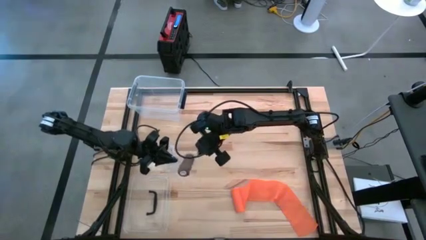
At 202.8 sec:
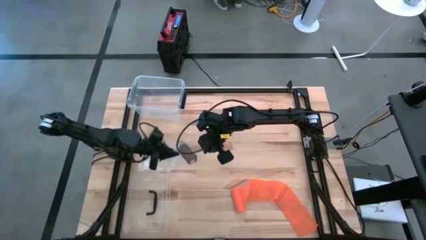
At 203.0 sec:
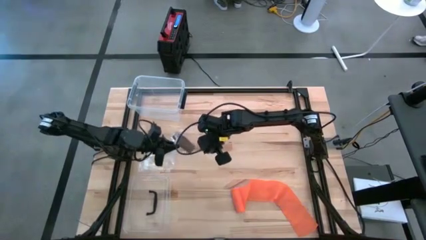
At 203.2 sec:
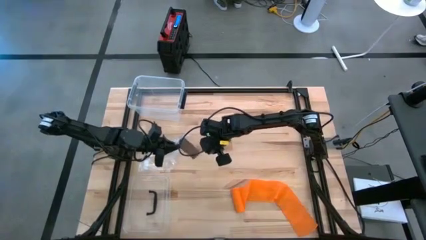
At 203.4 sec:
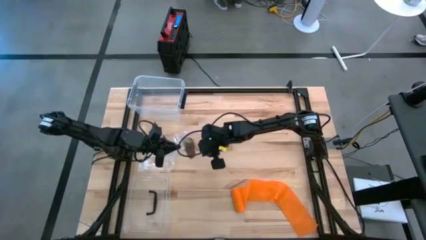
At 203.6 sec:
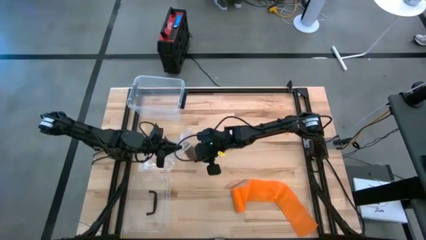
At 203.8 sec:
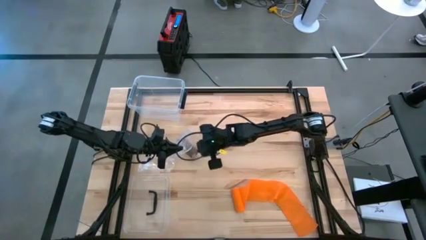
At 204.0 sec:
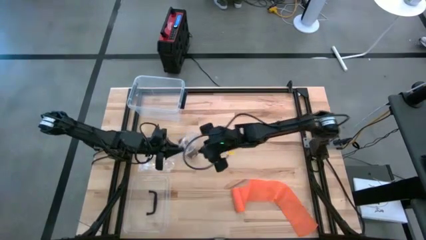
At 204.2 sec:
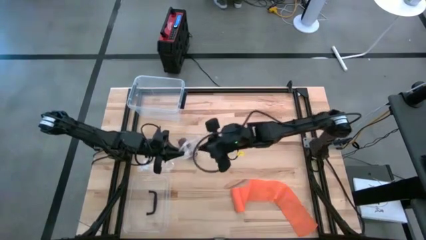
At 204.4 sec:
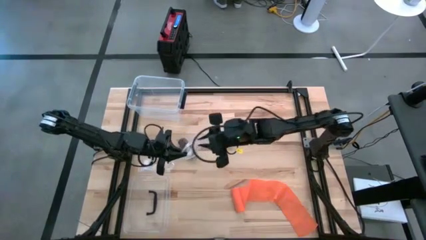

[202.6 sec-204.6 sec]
Task: Roll bandage
Put the brown bandage into the zip bag

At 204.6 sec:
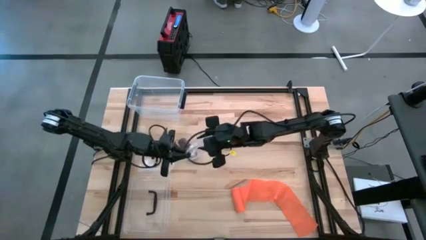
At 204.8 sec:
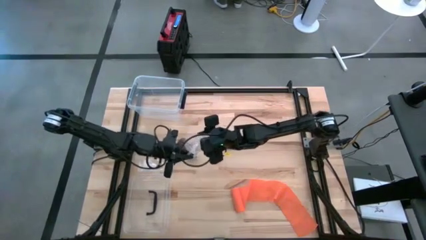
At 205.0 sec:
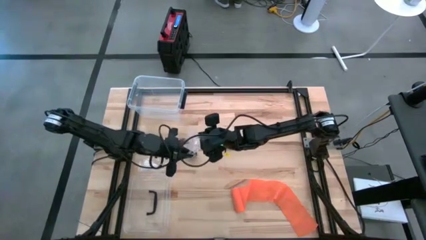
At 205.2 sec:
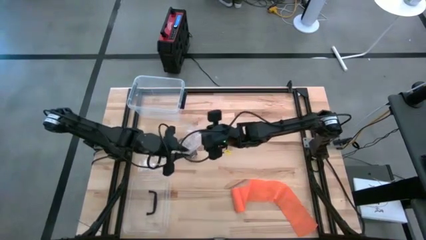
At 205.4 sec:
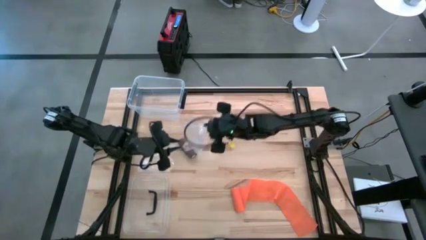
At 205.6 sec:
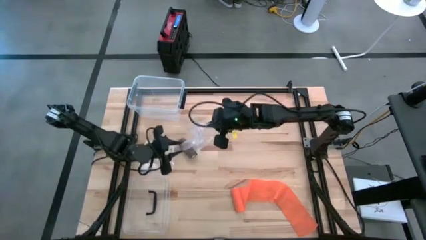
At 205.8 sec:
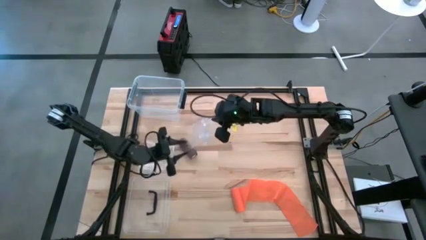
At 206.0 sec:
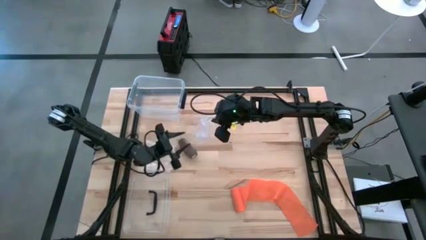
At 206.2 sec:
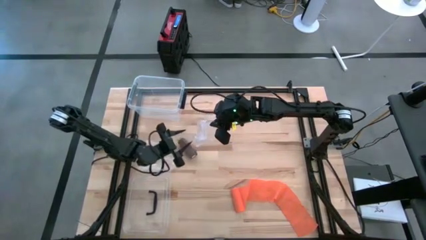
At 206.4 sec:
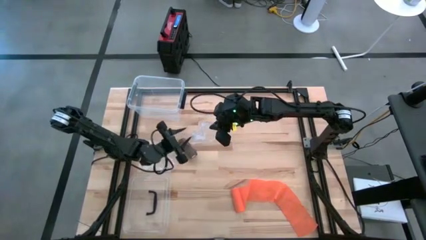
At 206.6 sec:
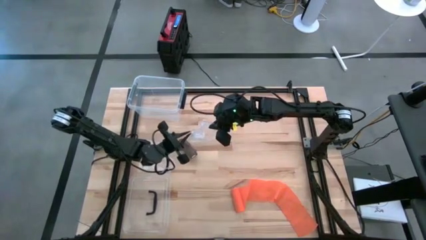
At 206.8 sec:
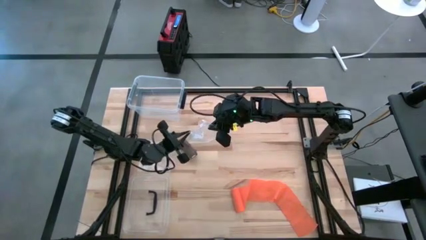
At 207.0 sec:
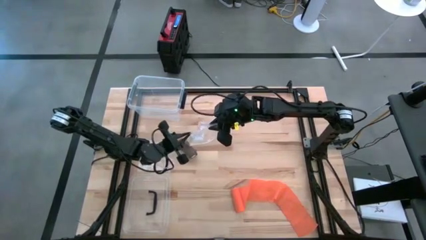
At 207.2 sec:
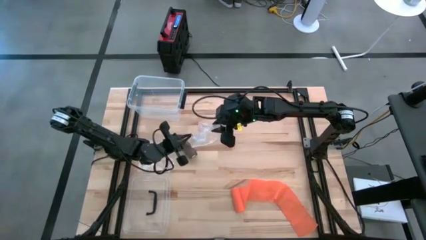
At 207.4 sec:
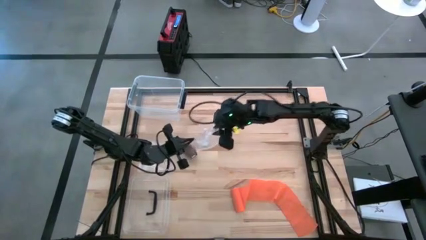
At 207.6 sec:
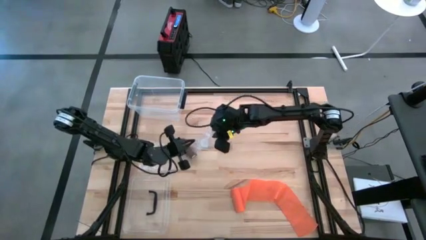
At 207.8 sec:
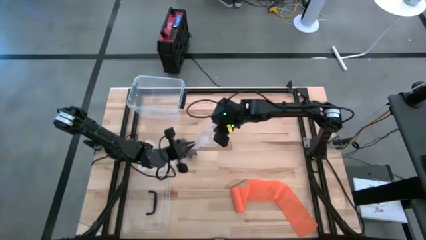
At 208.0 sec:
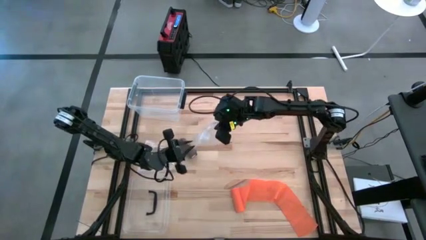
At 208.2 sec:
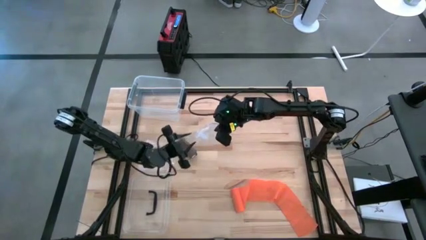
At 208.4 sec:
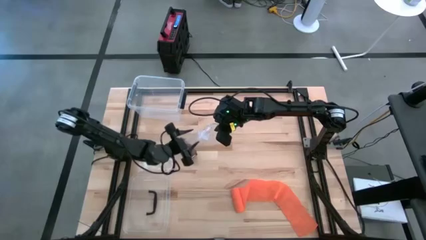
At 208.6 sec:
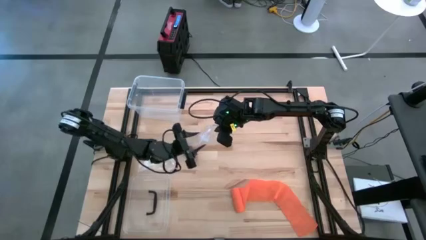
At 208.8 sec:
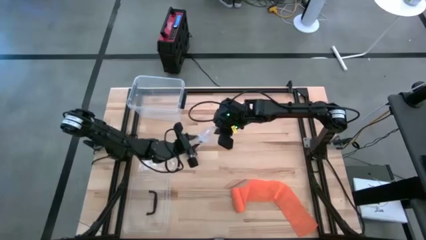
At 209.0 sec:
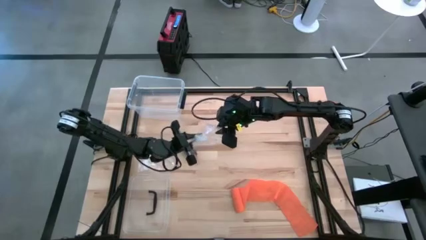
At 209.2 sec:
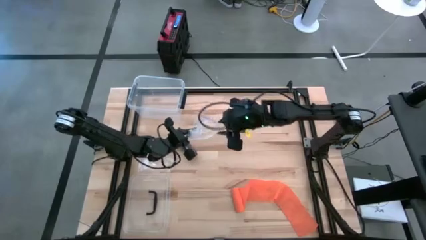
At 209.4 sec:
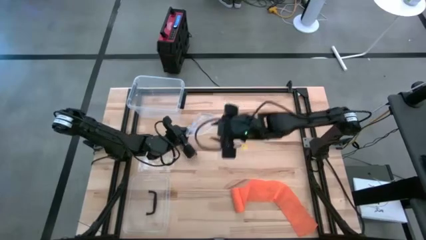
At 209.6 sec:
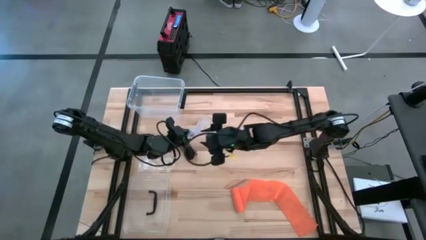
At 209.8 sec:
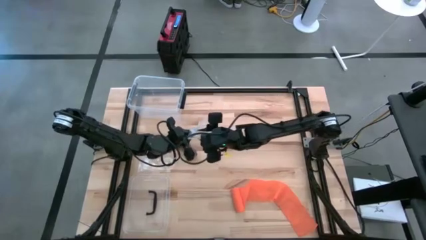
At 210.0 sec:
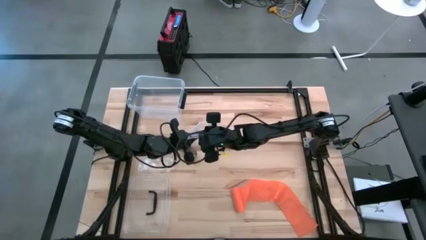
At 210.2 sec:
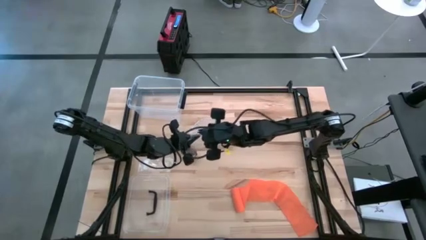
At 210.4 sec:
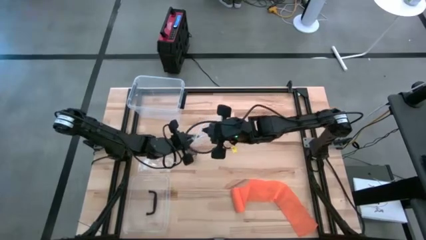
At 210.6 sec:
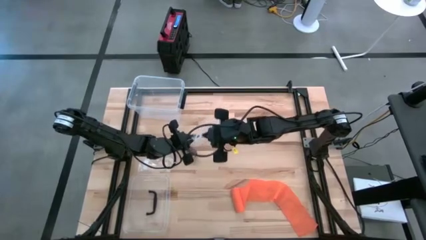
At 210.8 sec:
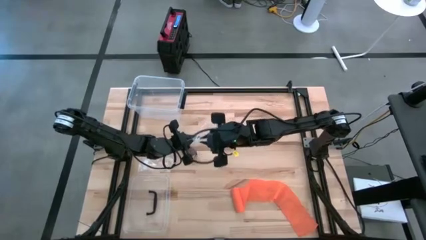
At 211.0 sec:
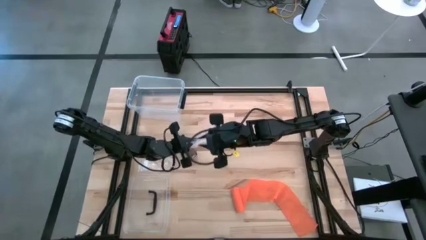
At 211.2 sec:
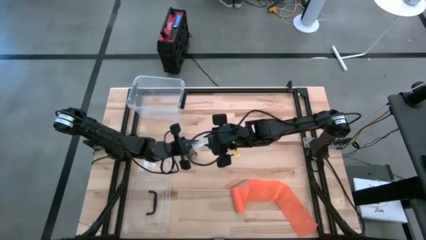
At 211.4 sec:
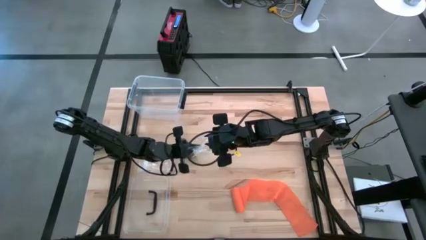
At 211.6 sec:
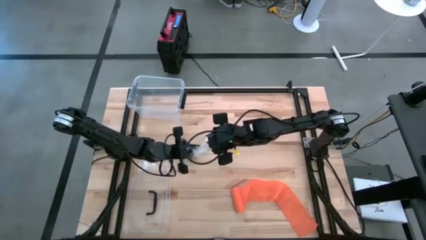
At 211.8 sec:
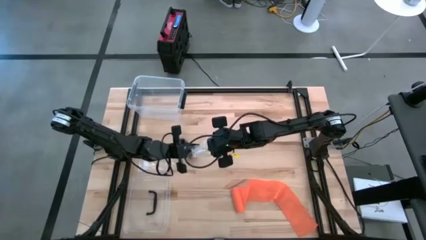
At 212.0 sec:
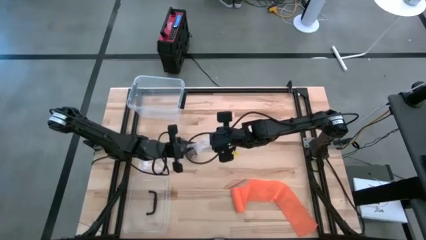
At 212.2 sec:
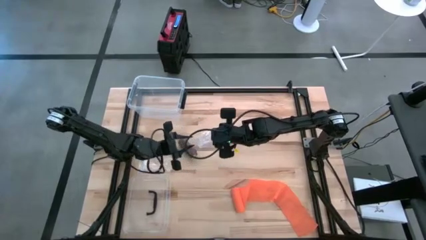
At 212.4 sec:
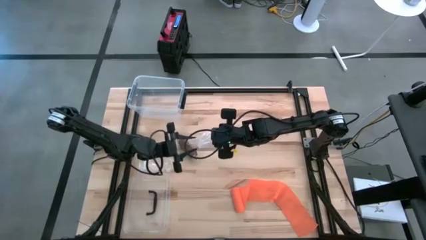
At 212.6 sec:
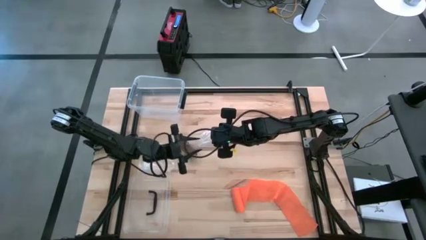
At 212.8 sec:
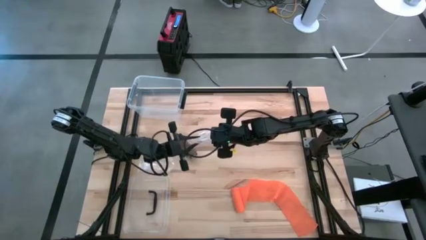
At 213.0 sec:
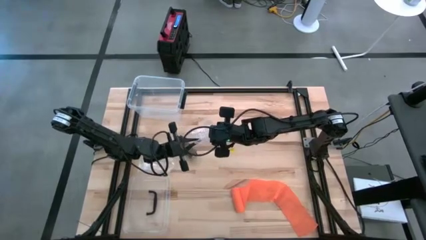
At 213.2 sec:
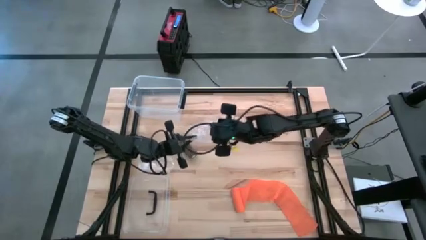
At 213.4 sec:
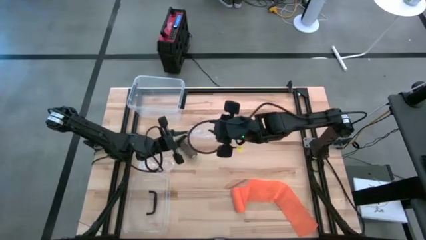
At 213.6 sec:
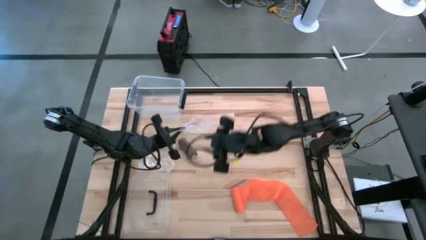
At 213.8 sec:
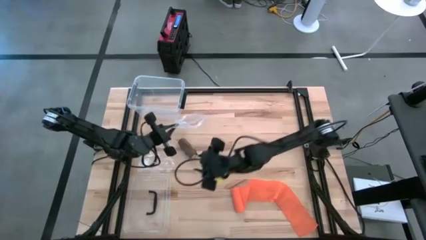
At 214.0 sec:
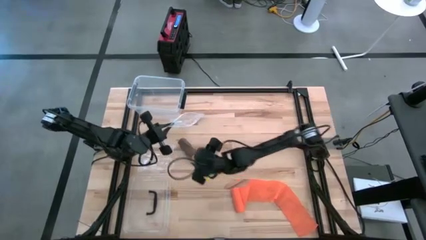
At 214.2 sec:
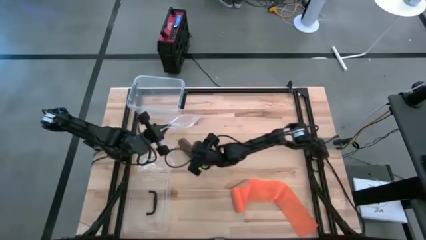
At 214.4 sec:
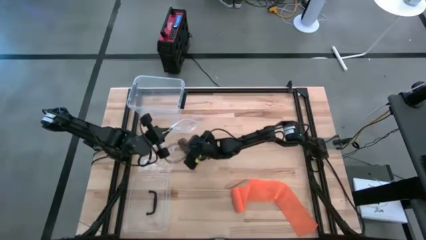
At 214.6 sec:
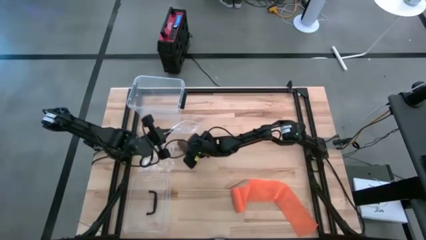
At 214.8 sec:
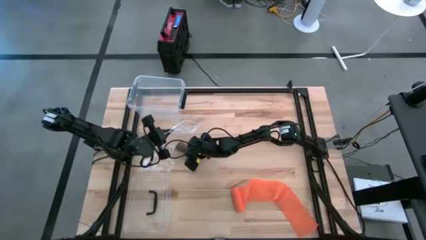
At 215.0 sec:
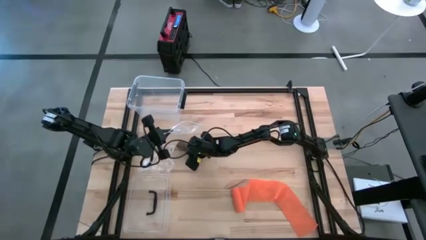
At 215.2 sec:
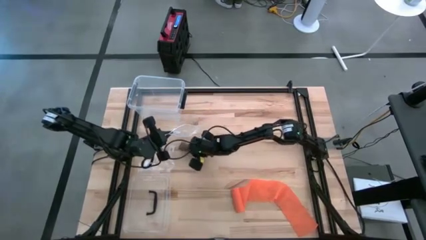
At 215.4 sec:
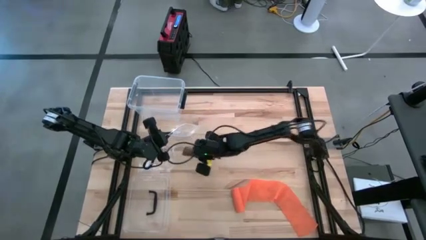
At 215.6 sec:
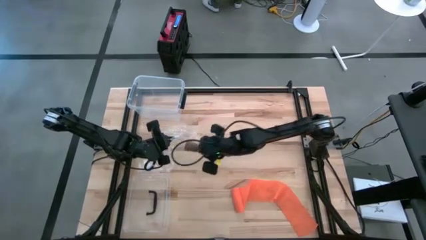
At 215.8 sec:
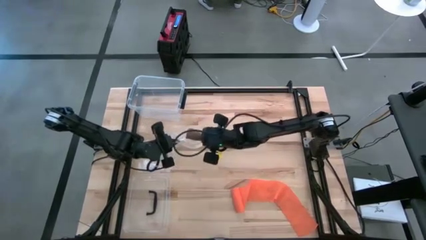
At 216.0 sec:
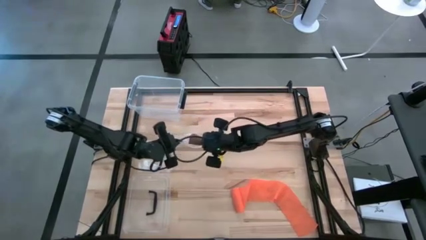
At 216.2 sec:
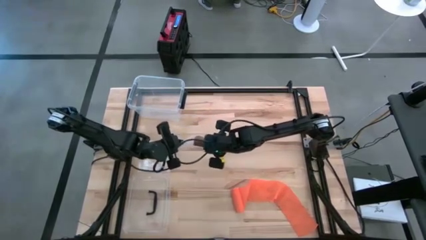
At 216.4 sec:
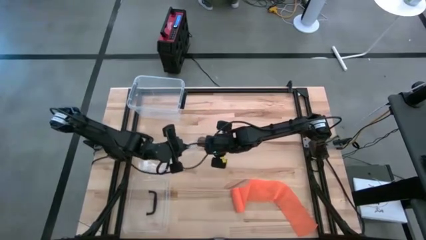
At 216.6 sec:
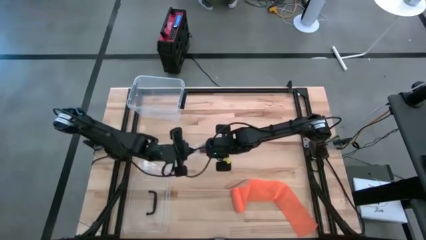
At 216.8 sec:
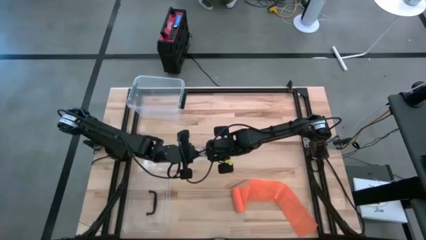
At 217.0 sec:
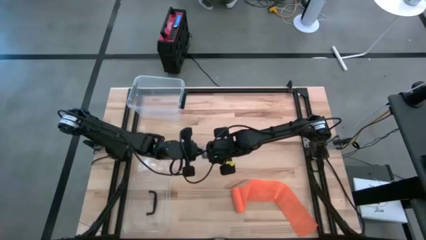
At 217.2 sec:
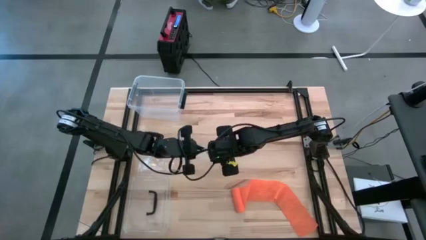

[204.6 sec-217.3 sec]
Put the brown bandage into the zip bag

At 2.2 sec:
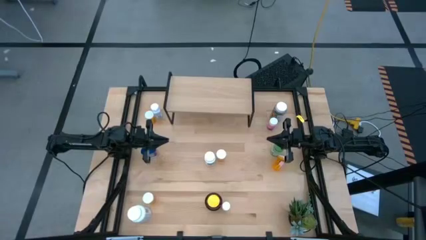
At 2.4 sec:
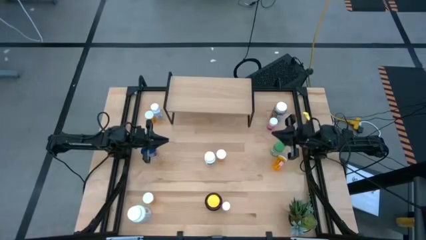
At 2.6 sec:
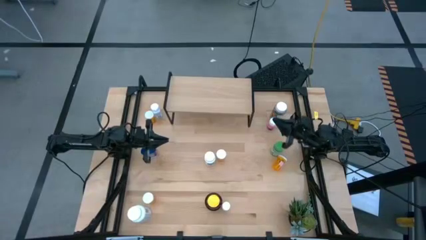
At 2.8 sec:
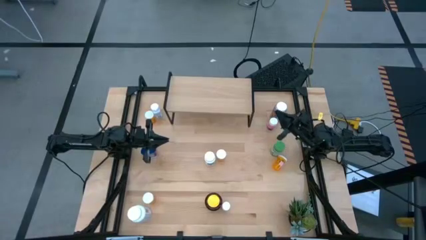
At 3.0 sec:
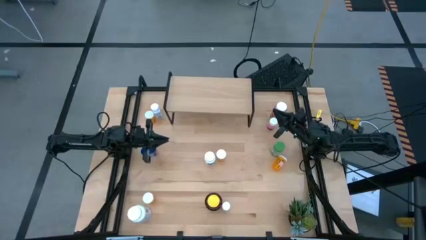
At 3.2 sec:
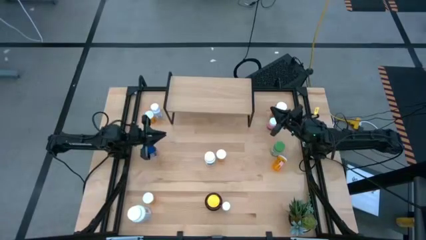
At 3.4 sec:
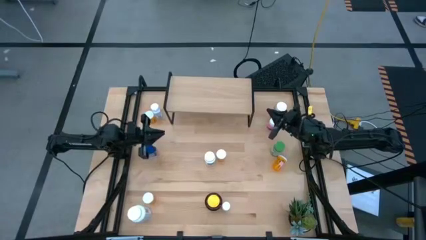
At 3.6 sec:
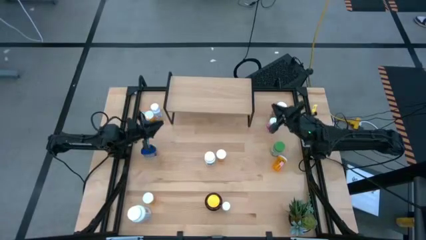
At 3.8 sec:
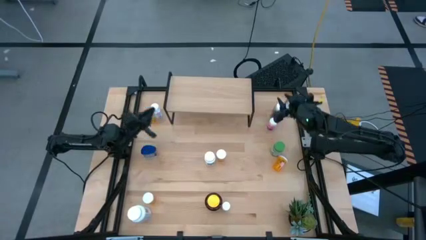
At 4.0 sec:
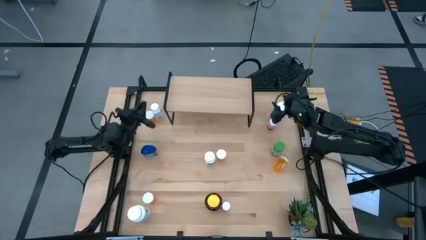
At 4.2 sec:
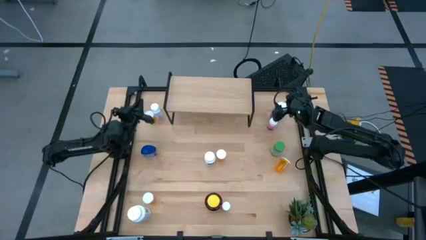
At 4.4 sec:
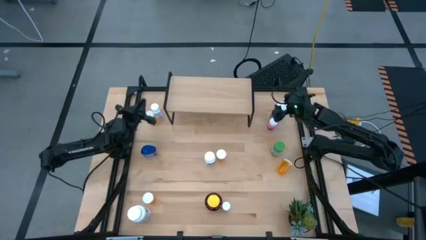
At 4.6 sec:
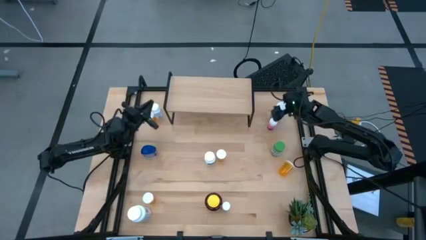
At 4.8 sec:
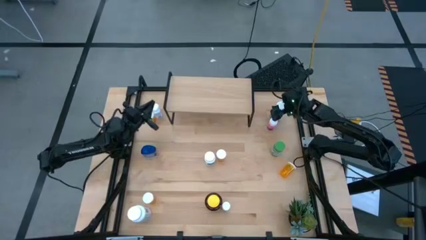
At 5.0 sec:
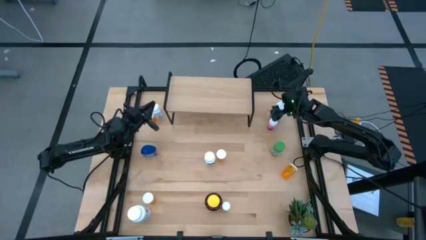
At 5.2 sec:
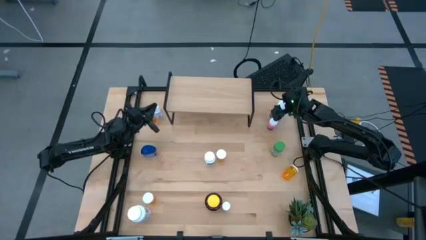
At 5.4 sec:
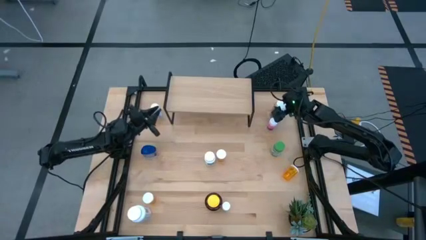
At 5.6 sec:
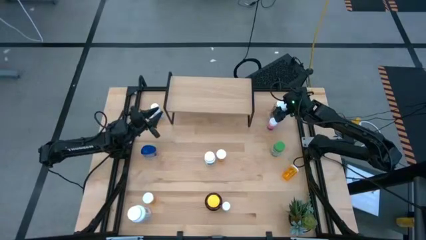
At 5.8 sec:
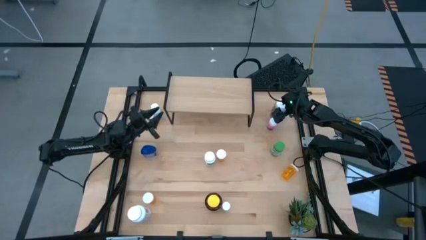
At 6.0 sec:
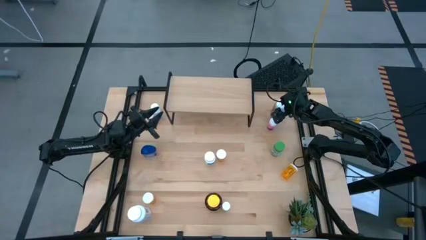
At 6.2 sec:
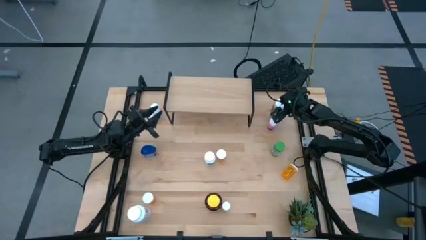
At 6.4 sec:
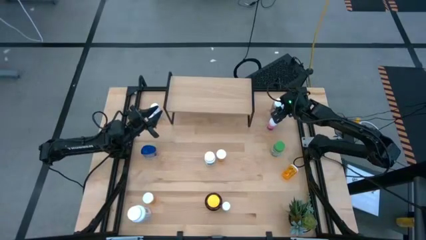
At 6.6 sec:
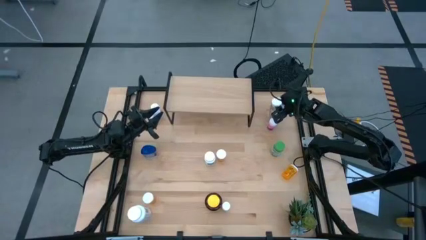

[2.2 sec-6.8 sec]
Task: Pick and place medicine bottles onto shelf by color
Put the green pill bottle on the shelf
